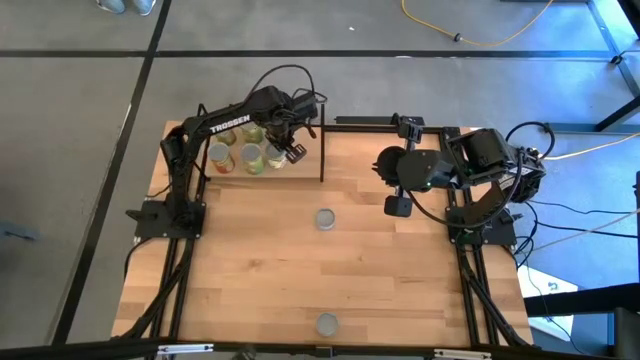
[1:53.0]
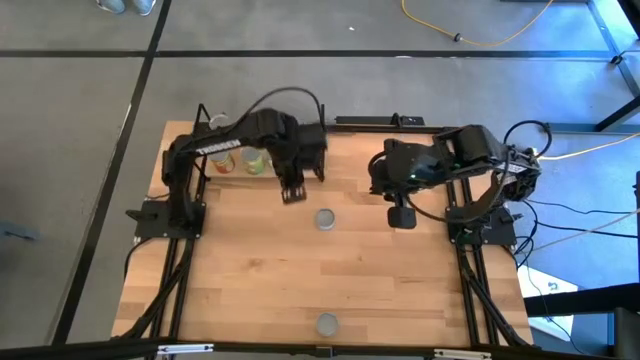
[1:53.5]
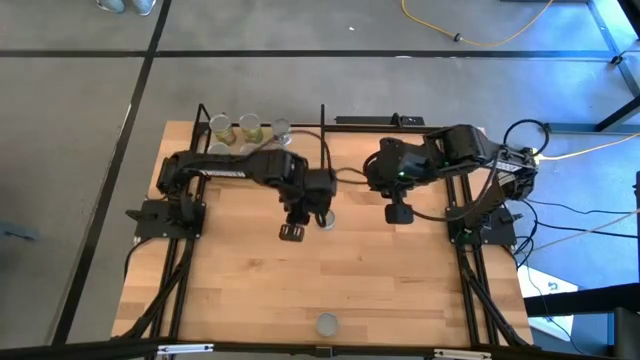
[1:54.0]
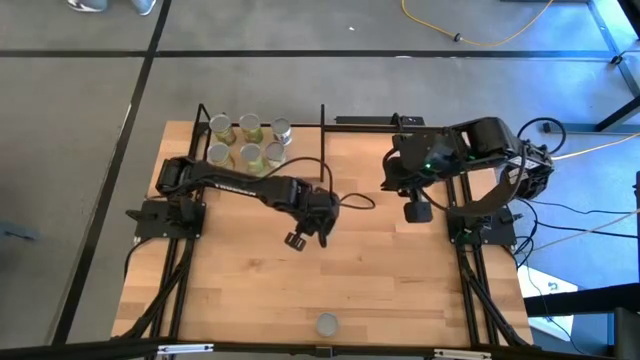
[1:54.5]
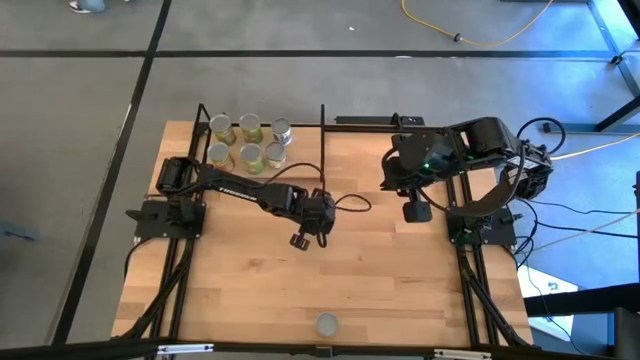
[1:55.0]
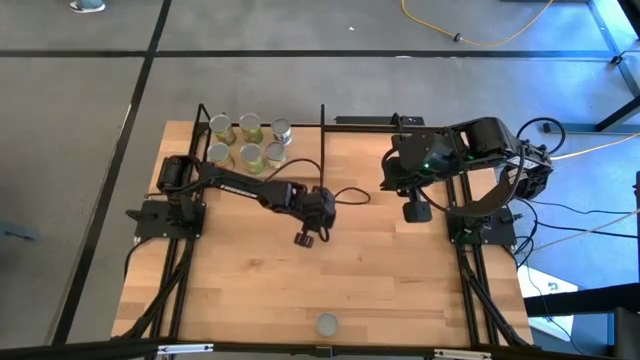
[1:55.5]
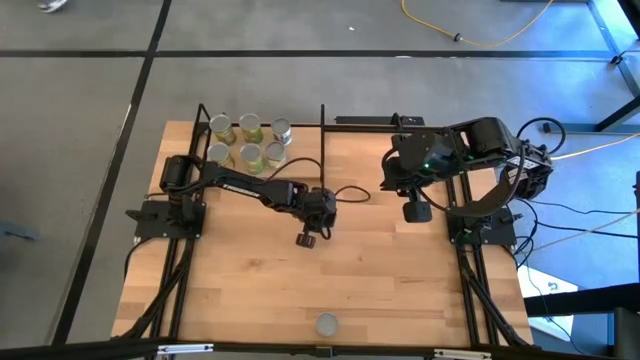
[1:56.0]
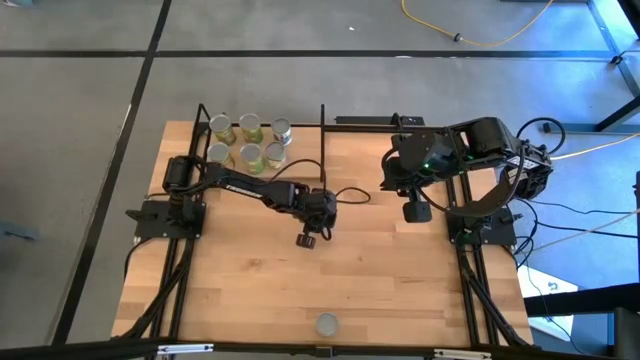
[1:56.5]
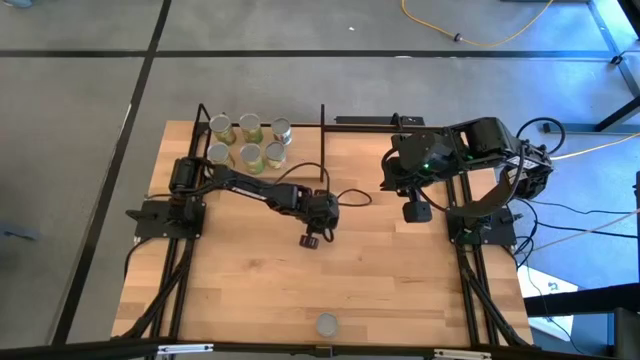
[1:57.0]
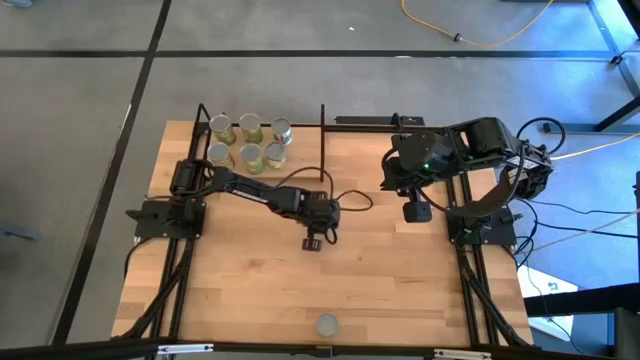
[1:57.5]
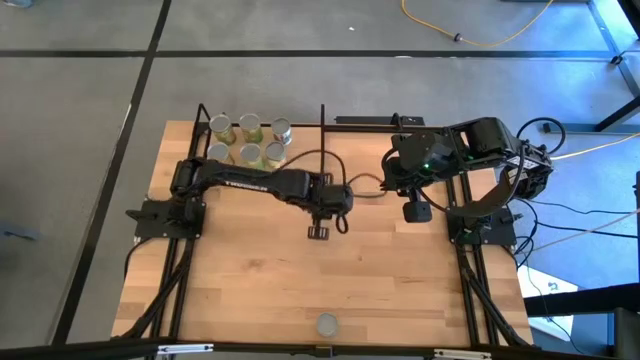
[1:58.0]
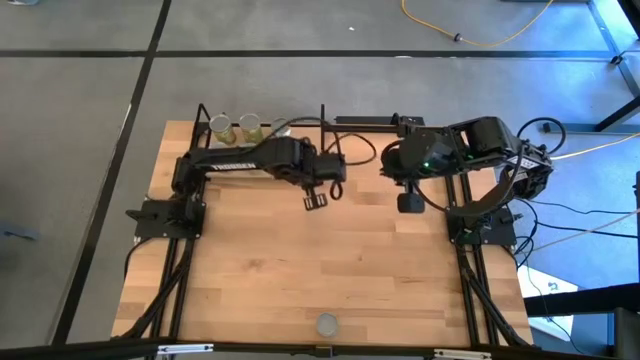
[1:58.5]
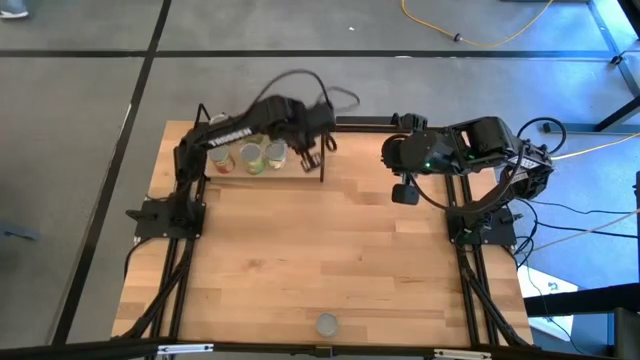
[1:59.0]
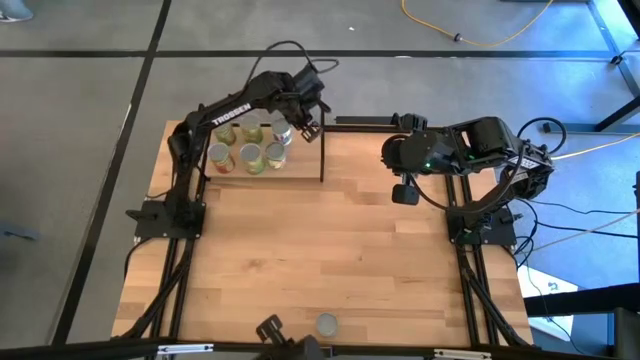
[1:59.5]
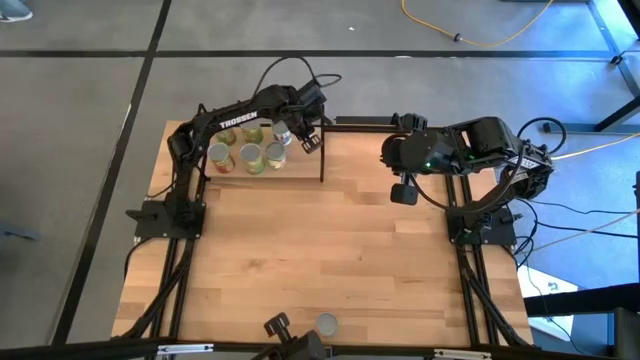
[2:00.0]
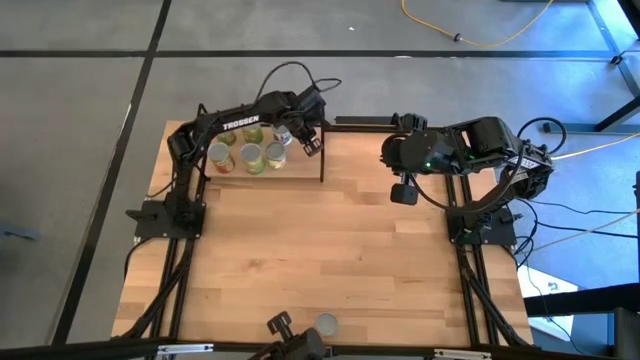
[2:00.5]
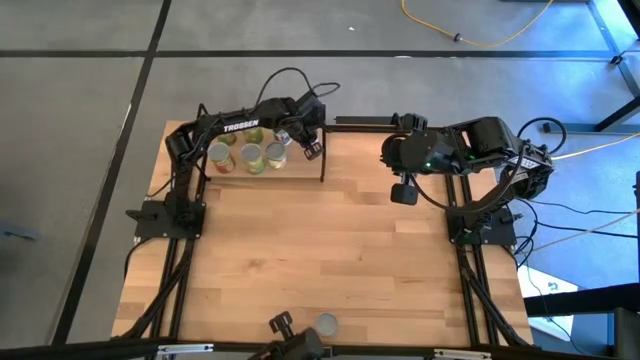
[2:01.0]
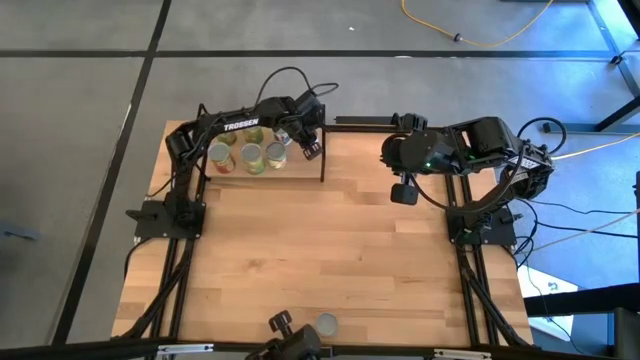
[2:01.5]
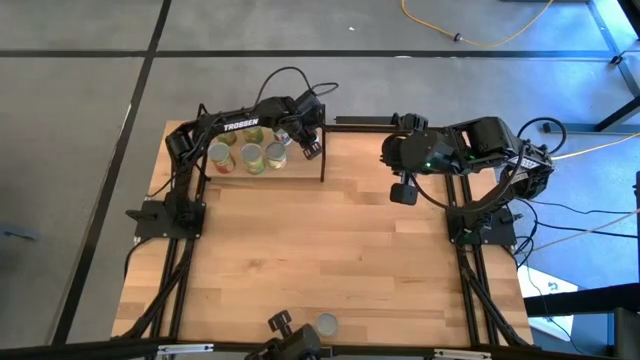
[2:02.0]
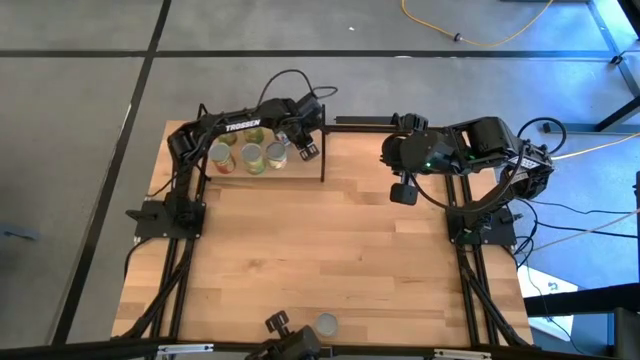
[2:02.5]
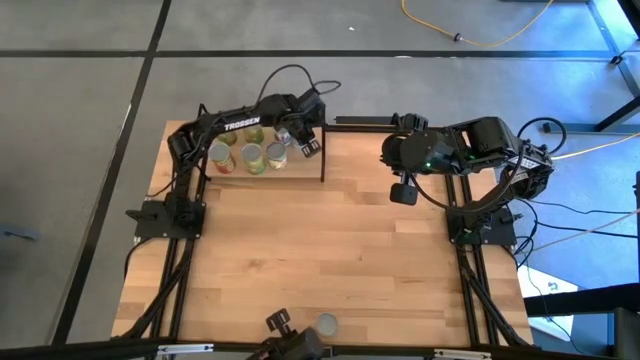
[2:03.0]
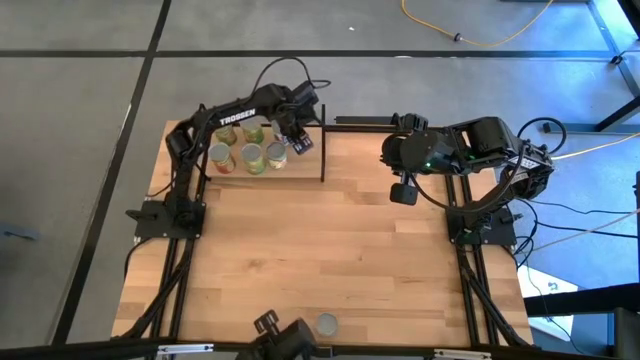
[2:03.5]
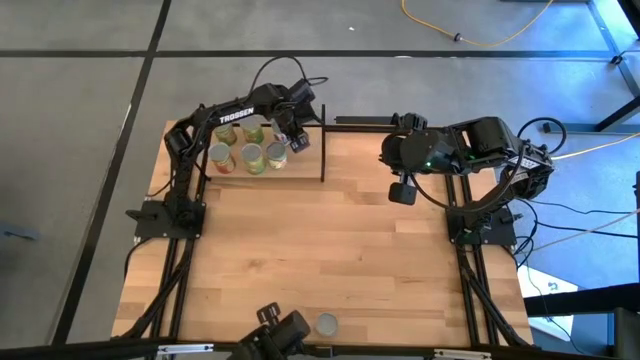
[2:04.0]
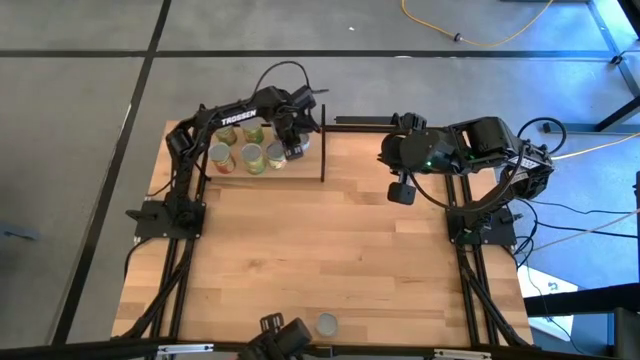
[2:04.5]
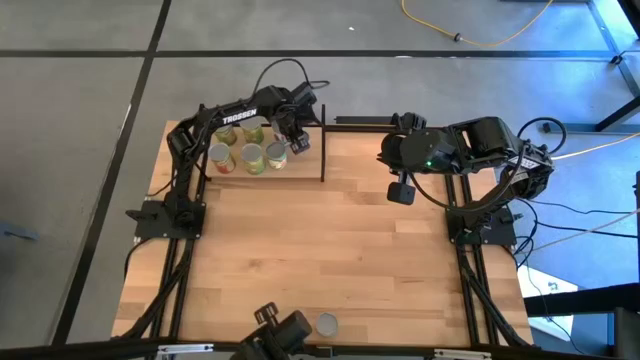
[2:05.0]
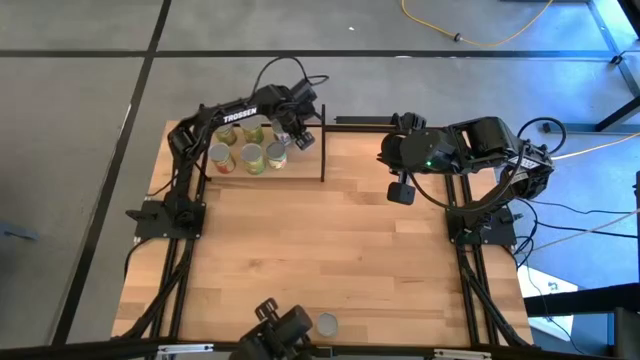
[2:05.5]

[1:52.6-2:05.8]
Task: Pick and place cans onto a shelf
Put the canned tuna on the shelf

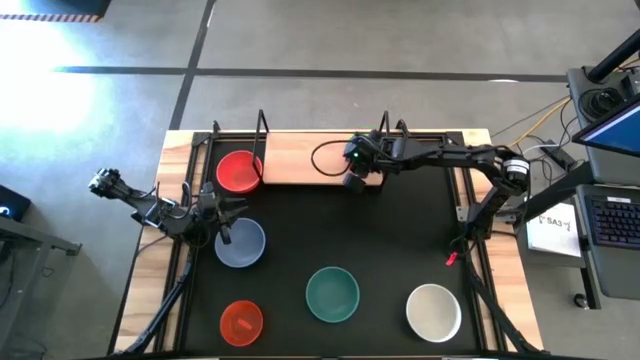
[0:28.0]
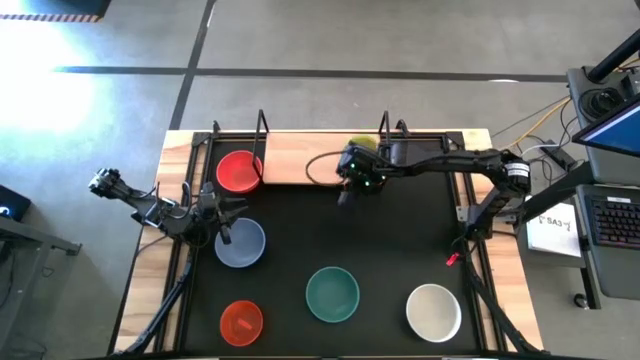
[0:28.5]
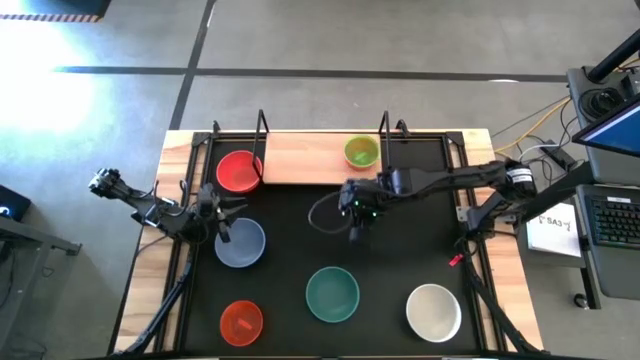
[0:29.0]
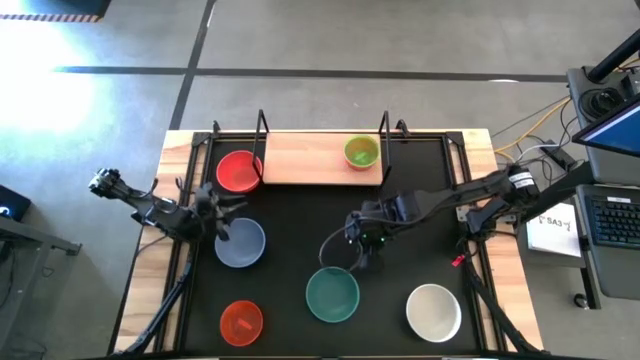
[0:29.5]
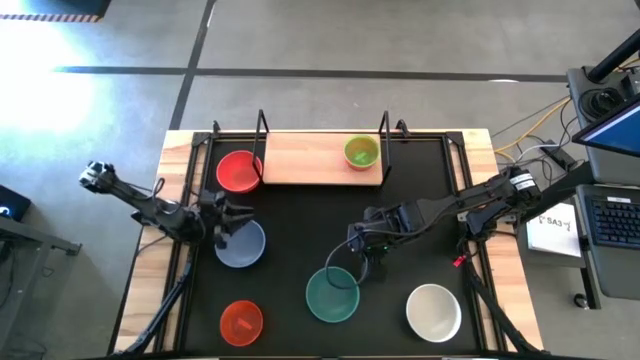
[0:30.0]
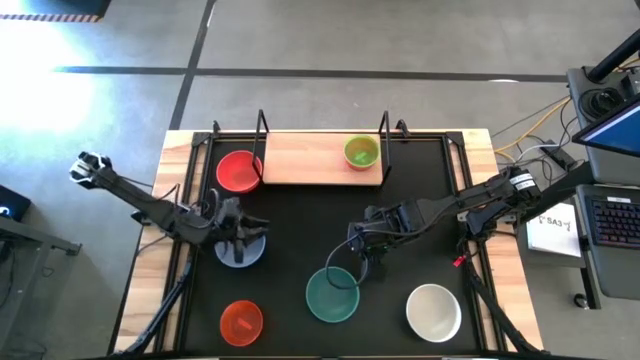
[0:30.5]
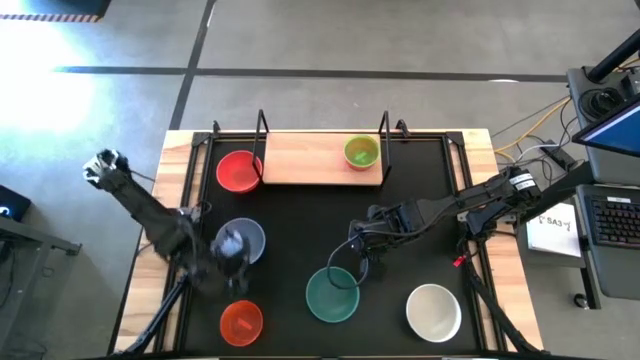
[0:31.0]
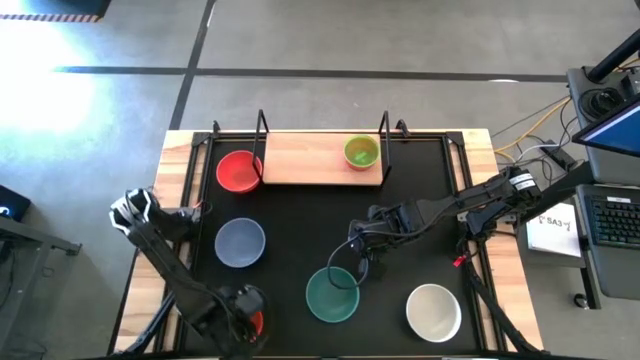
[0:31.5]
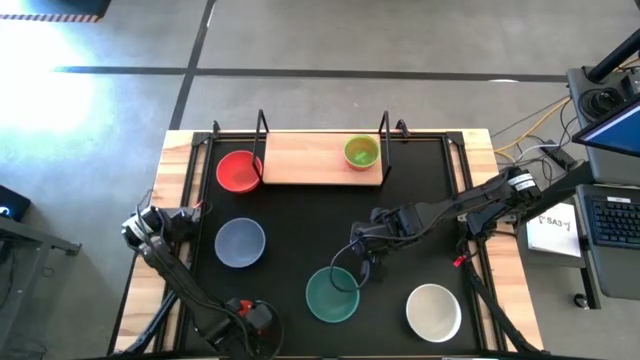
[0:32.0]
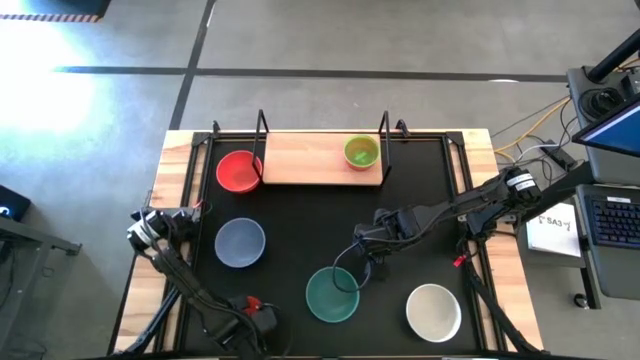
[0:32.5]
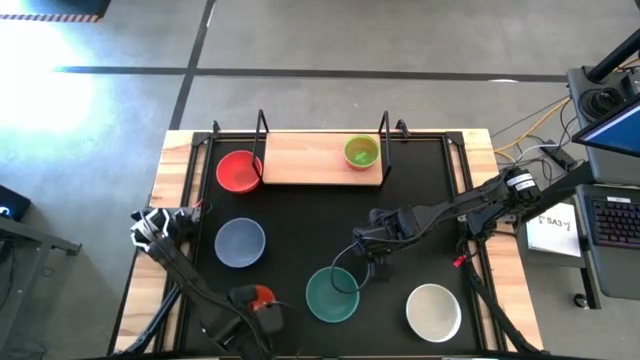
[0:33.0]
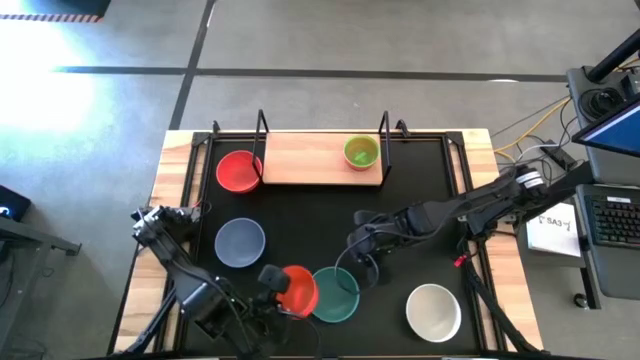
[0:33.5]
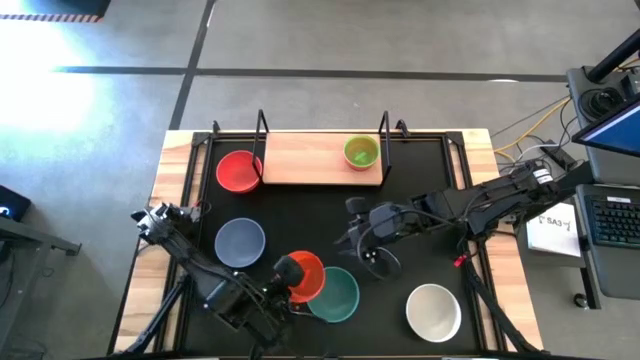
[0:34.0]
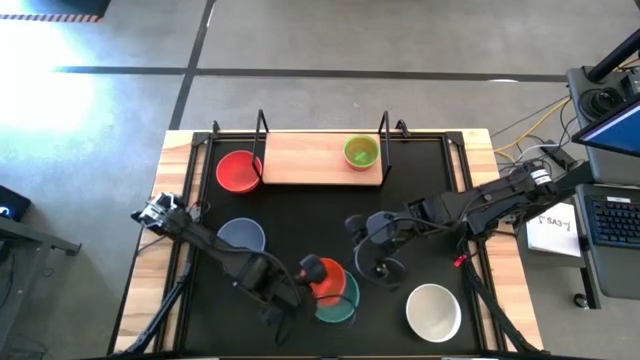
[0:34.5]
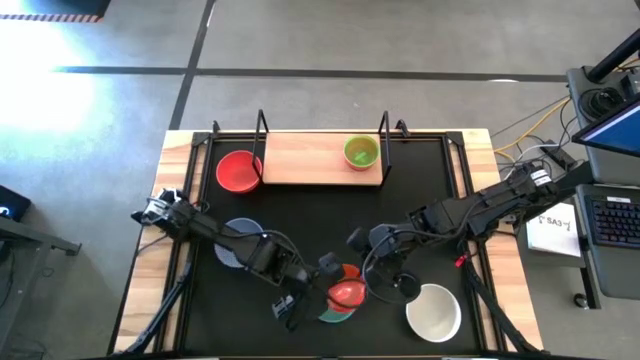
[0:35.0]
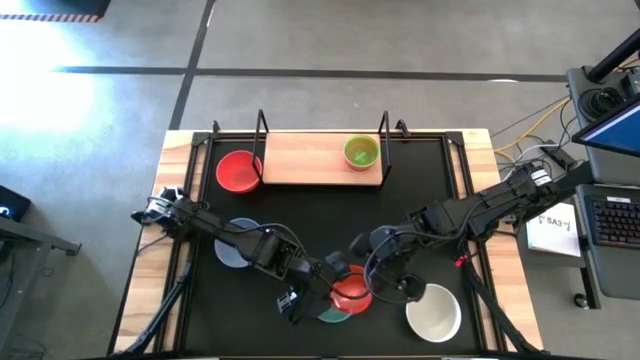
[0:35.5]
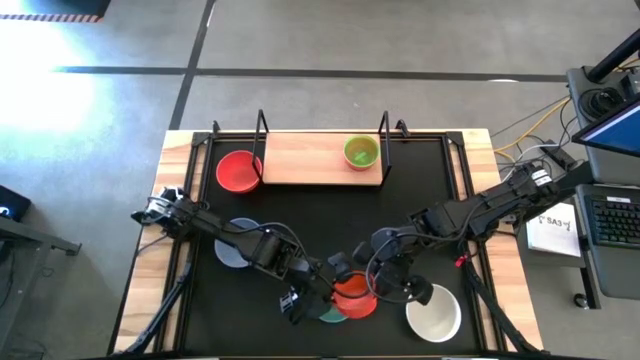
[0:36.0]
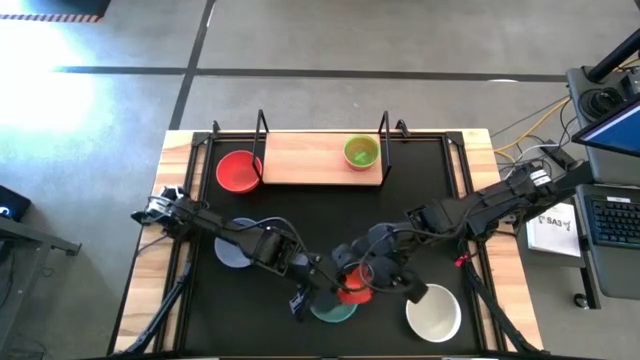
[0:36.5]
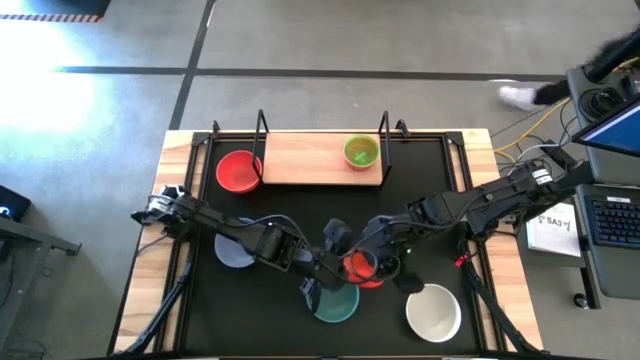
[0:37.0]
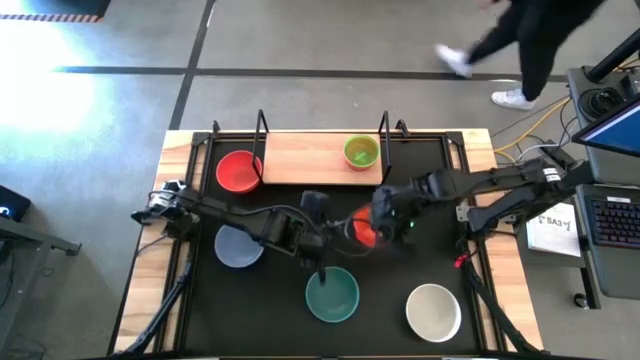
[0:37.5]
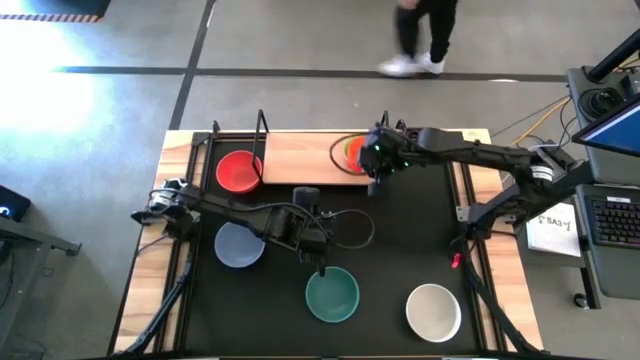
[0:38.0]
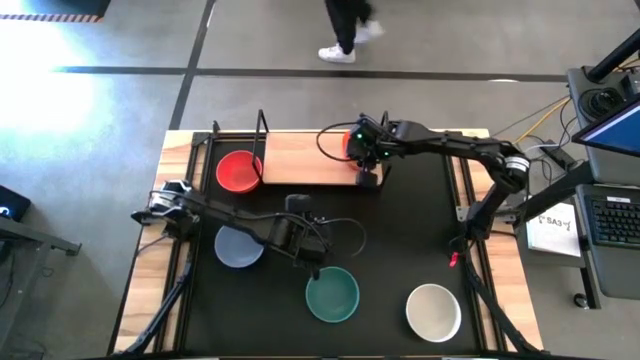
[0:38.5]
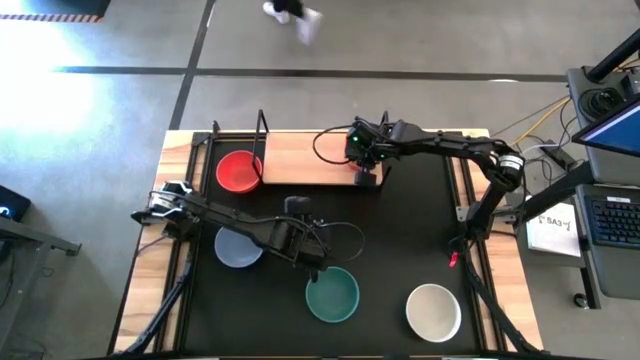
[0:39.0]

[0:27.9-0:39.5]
Task: Place and stack bowls onto a shelf
Stack the light orange bowl on top of the light green bowl on the shelf
